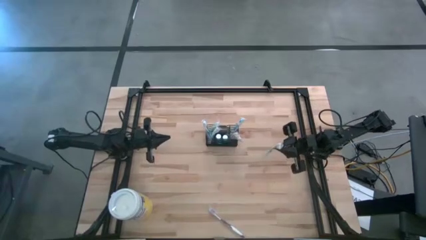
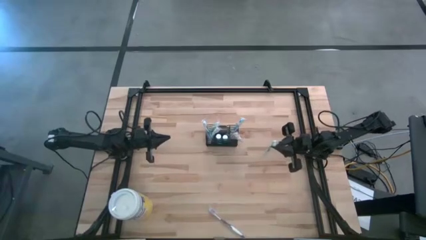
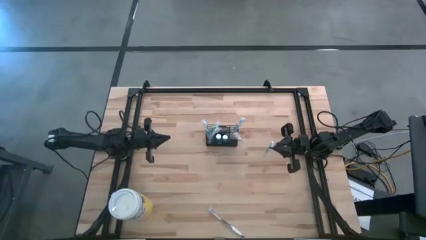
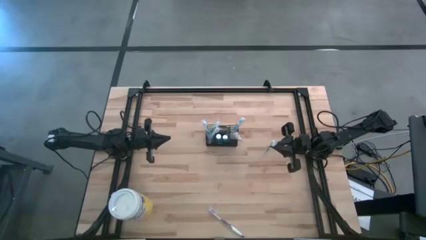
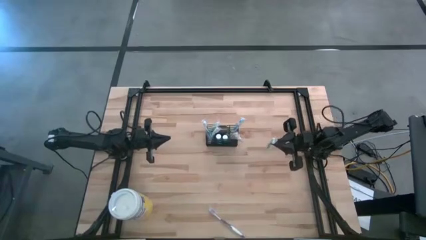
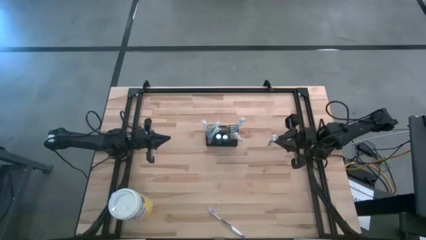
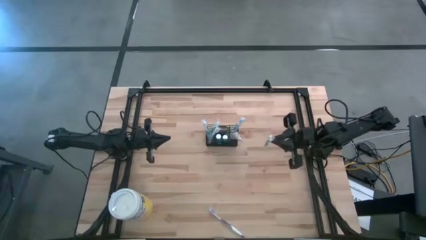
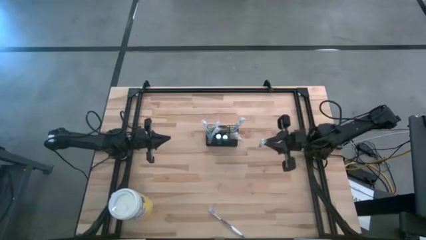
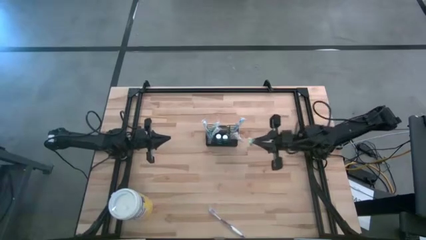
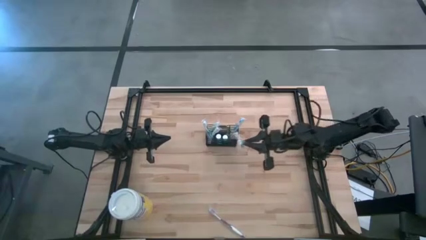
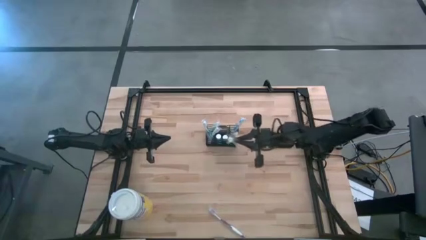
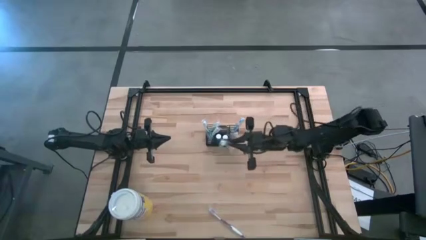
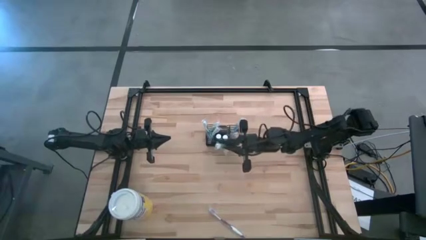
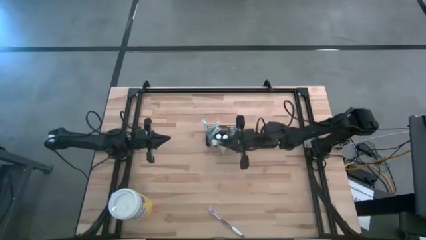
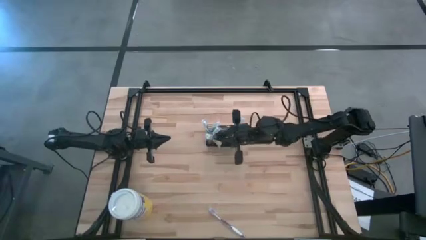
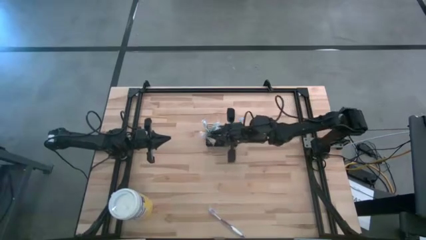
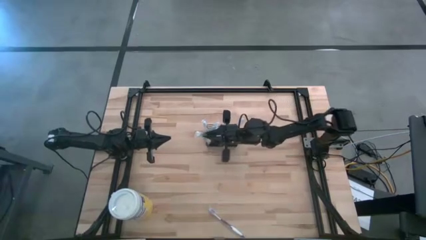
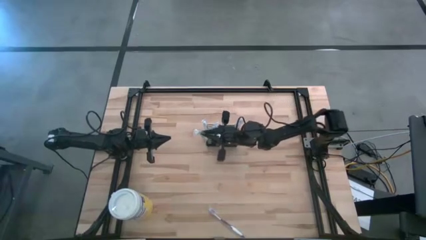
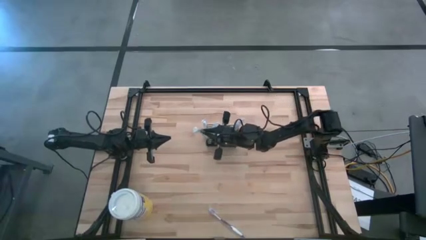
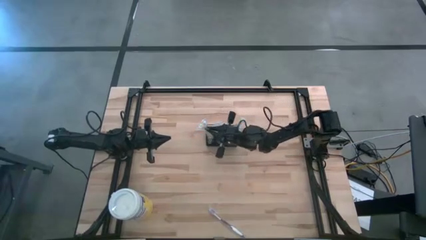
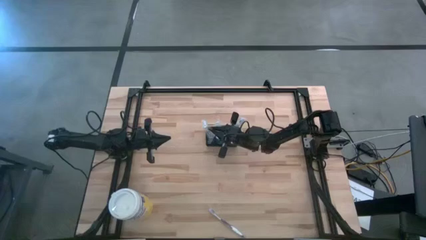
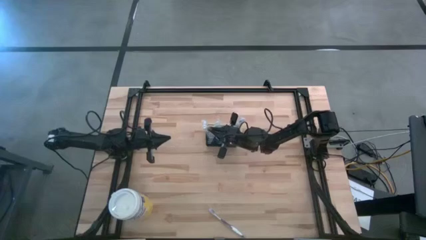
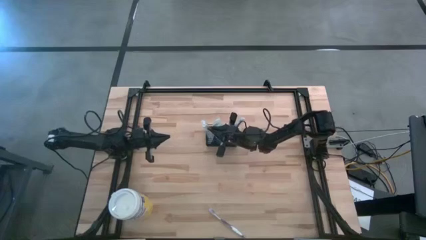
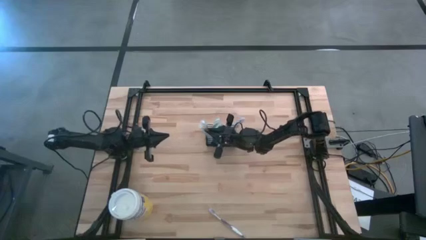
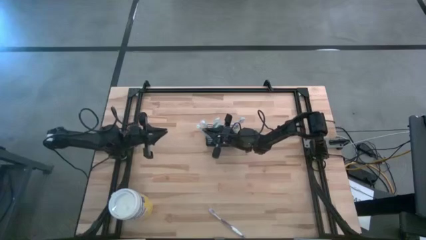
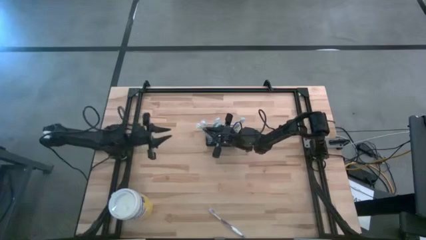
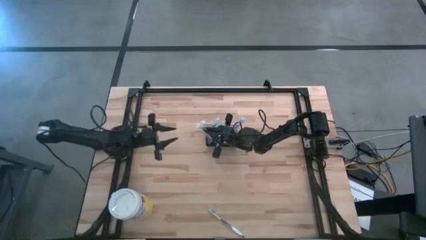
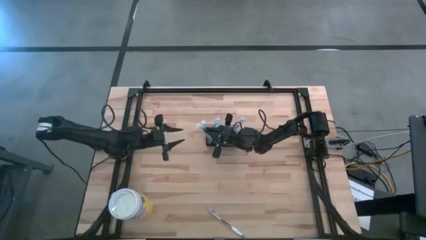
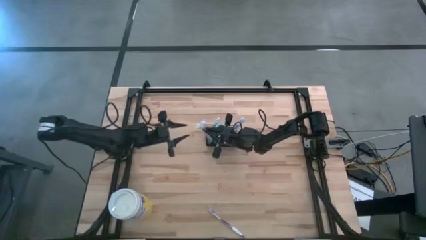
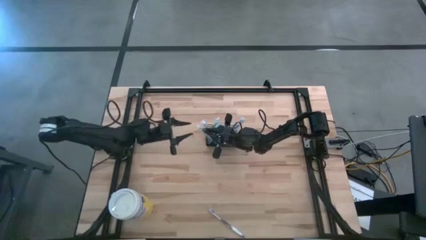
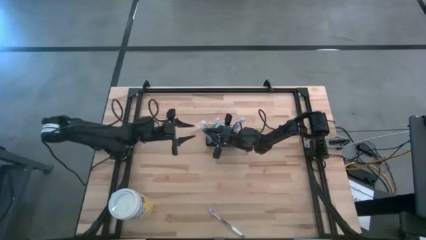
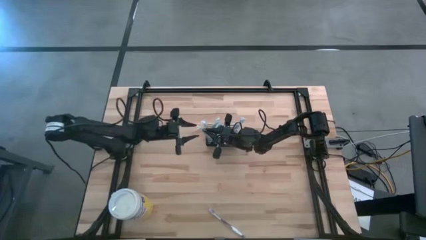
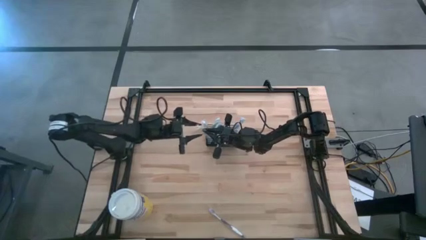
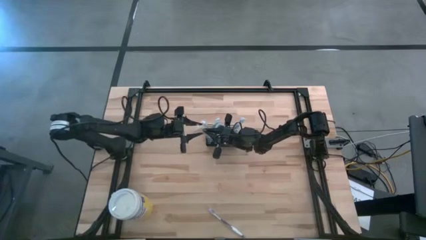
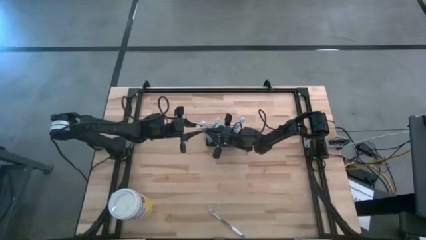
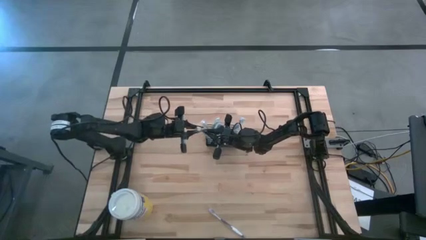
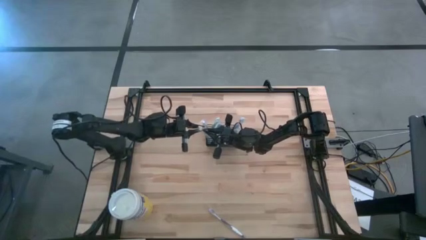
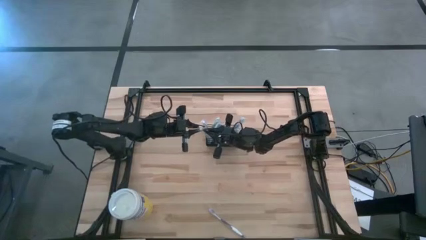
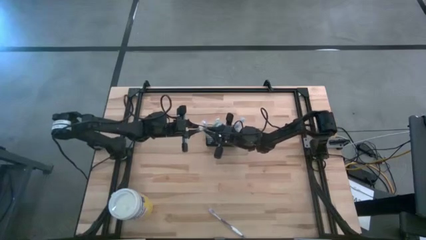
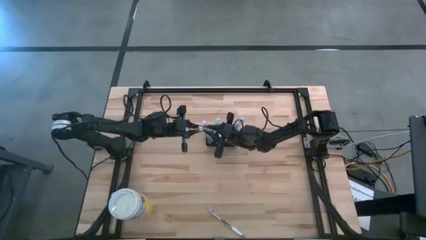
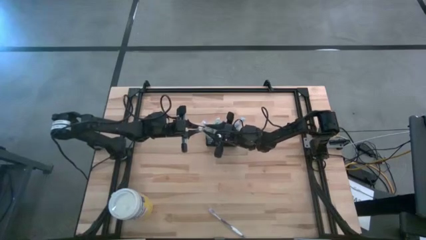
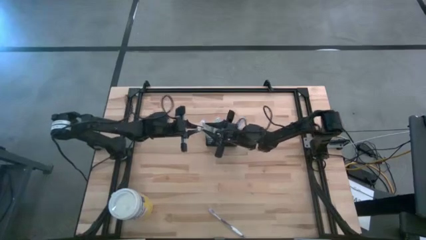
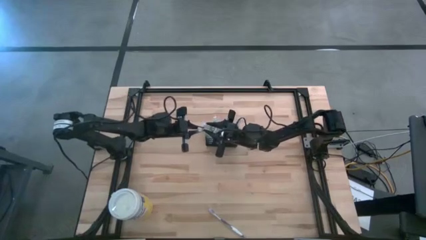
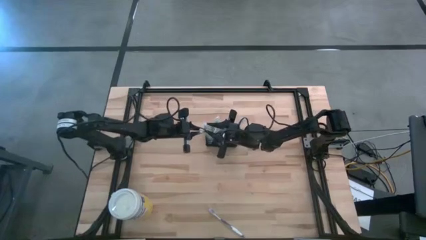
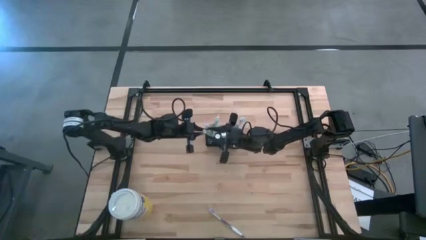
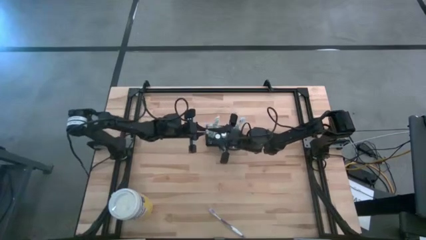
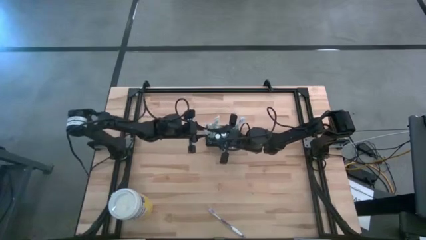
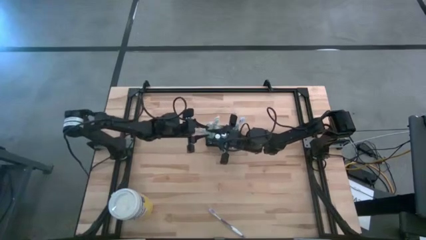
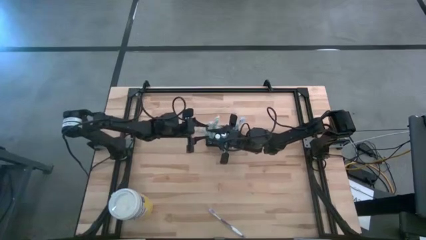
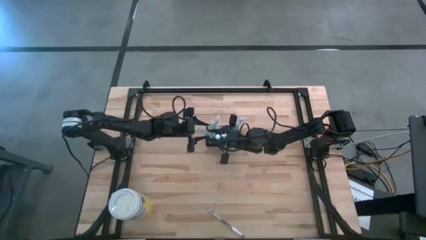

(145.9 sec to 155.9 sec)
Task: Pick & Place toothbrushing station
Put the green toothbrush into the wire organizer

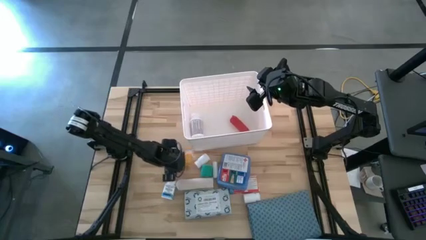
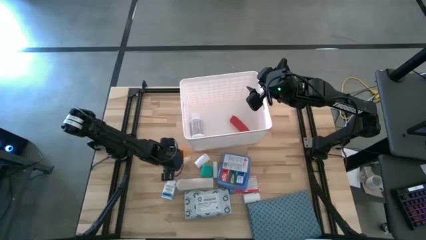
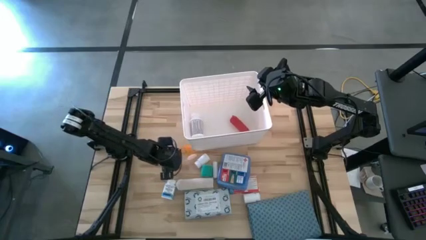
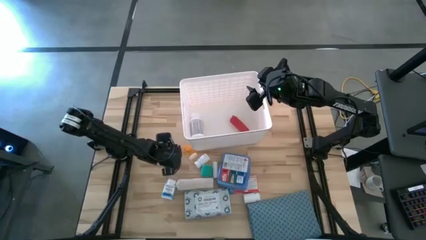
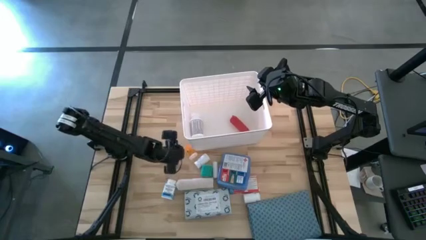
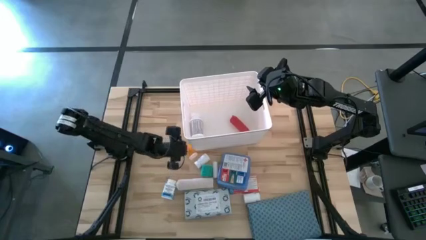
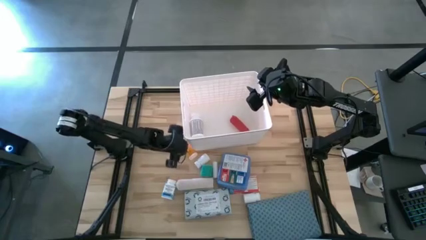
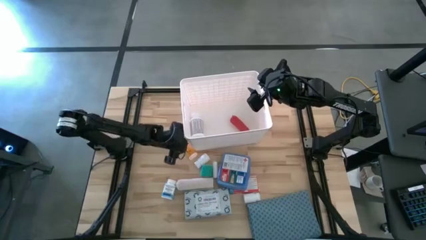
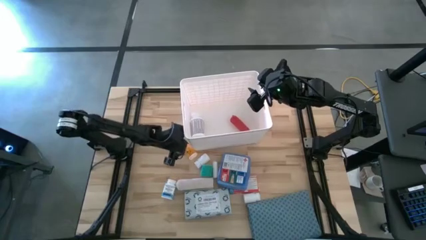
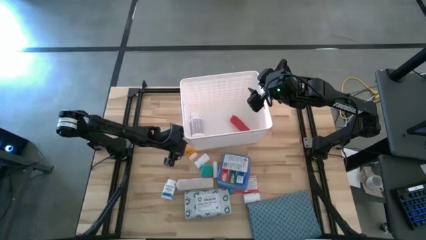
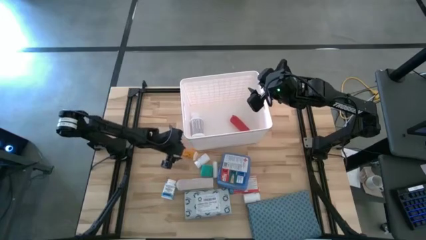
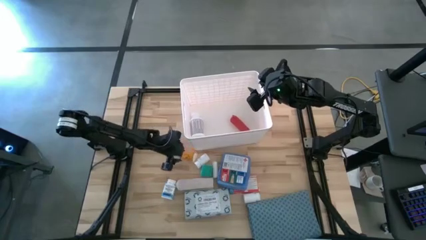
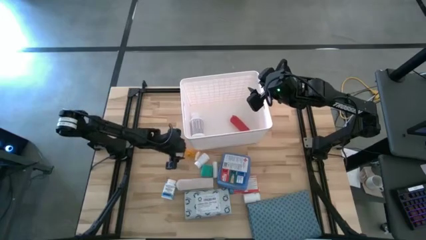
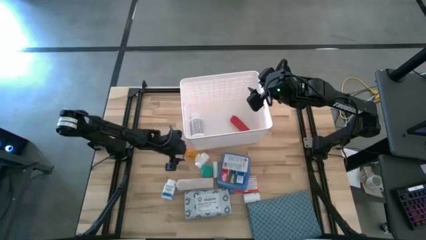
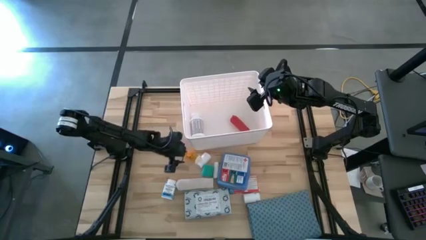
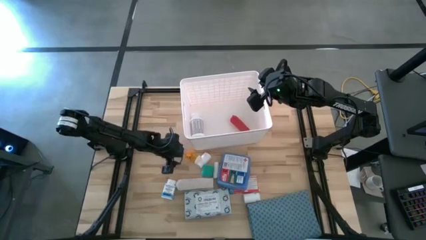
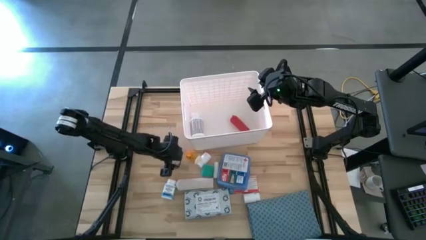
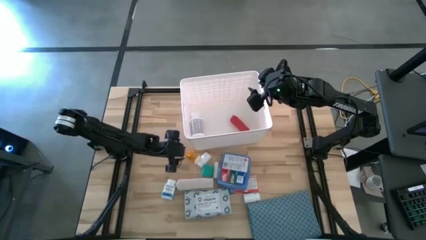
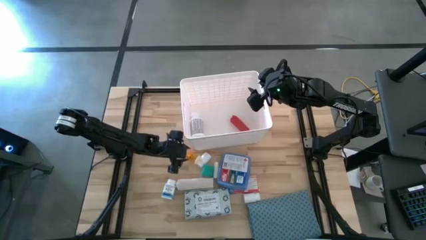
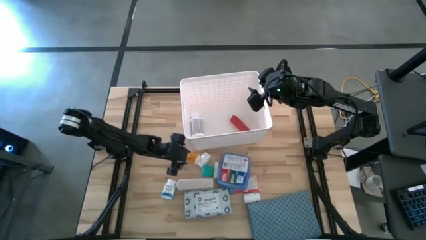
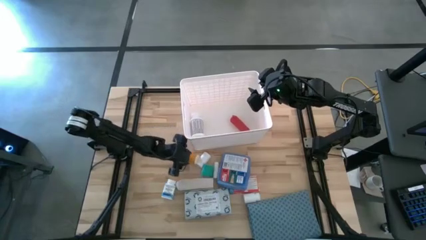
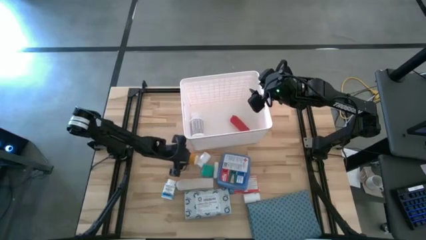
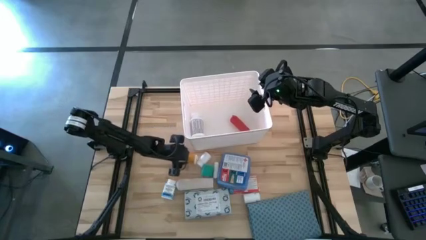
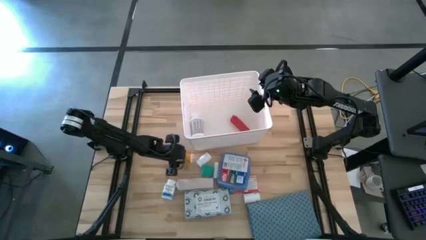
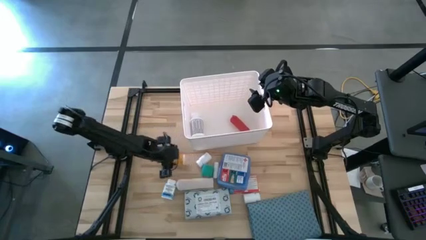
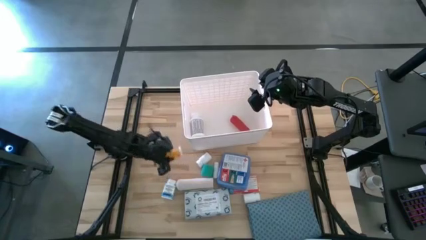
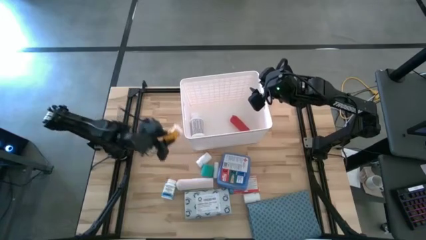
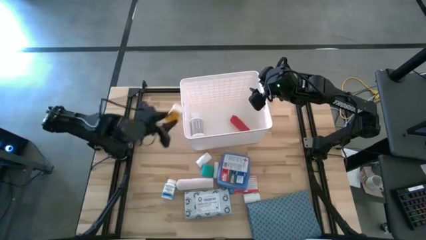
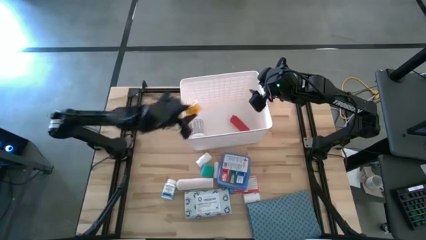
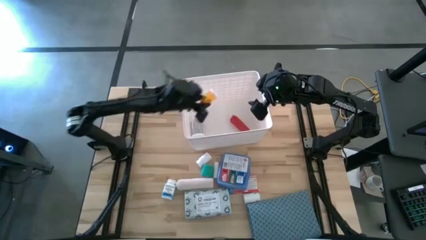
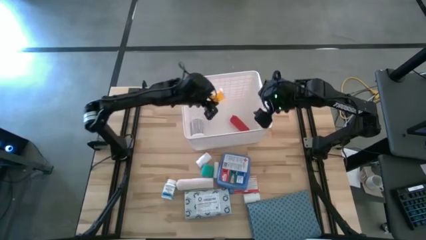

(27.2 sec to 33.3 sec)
Task: Pick & place medical supplies in basket/bin
Put the orange pill bottle into the white bin
